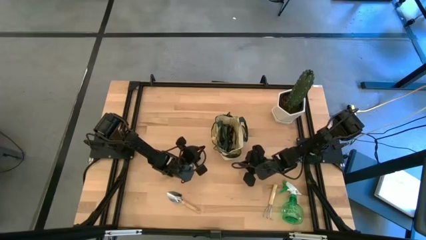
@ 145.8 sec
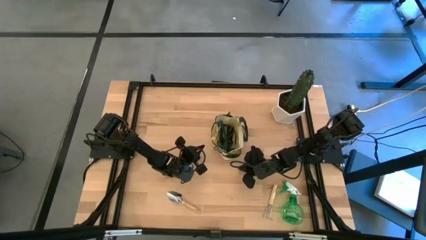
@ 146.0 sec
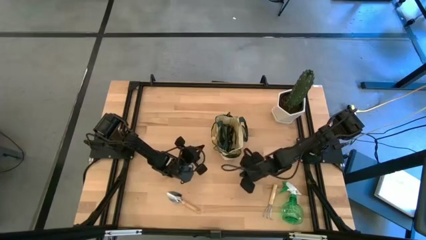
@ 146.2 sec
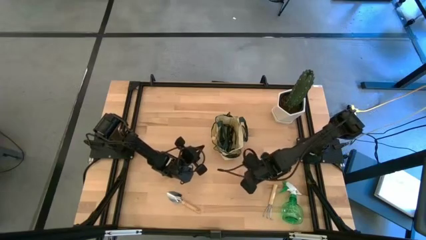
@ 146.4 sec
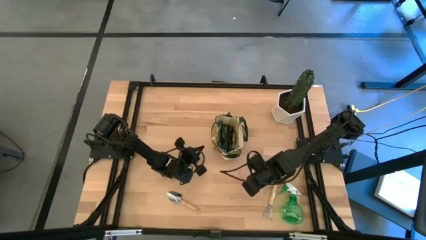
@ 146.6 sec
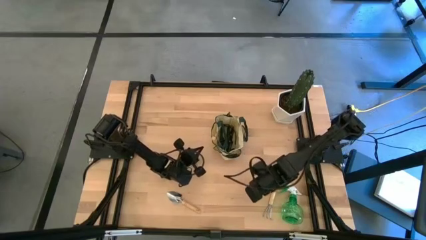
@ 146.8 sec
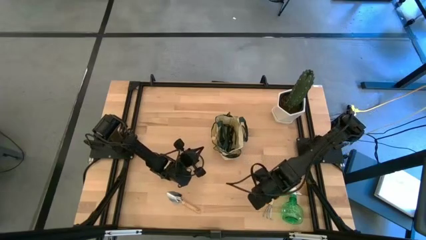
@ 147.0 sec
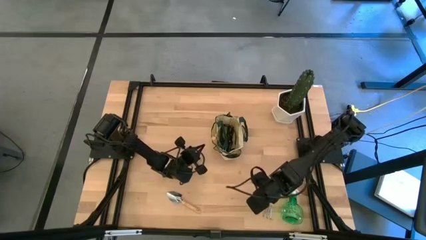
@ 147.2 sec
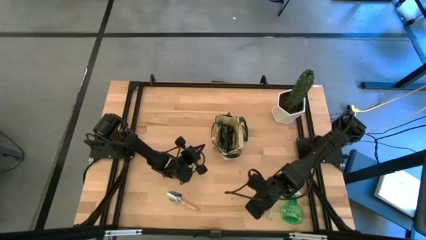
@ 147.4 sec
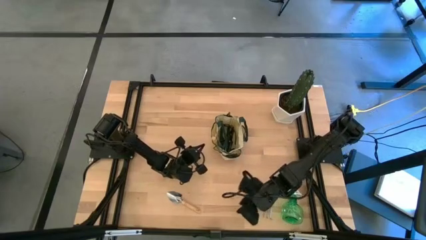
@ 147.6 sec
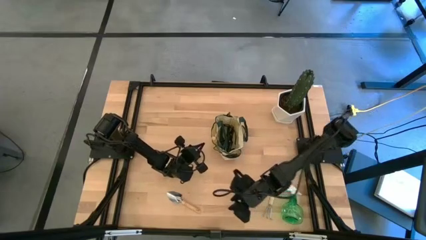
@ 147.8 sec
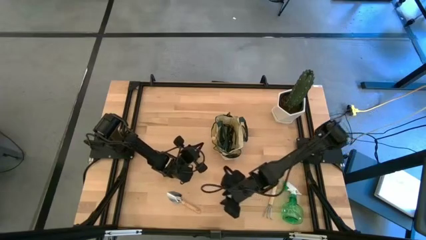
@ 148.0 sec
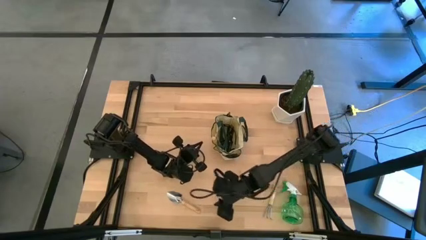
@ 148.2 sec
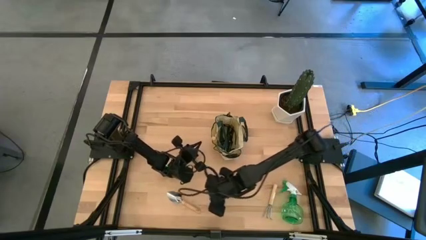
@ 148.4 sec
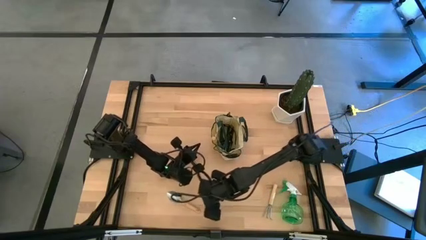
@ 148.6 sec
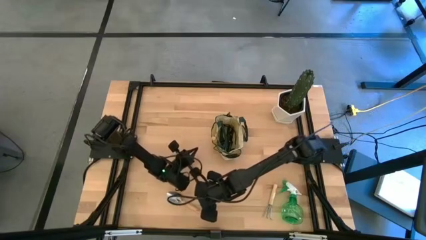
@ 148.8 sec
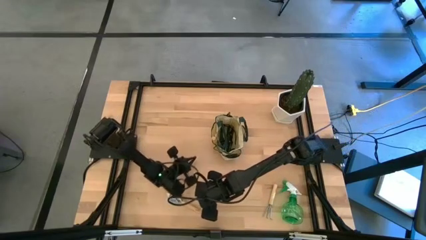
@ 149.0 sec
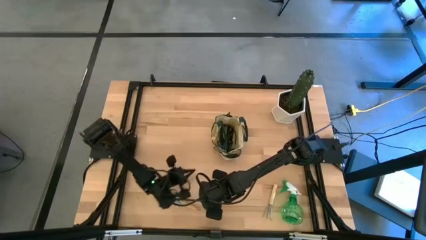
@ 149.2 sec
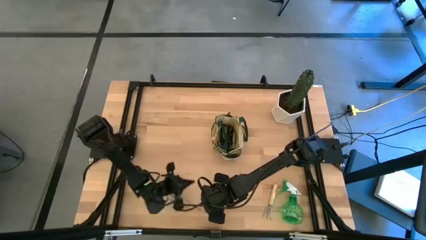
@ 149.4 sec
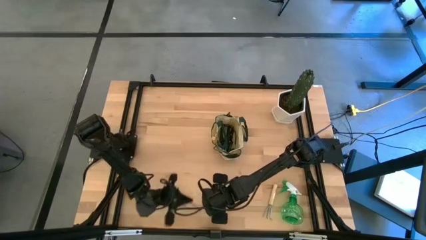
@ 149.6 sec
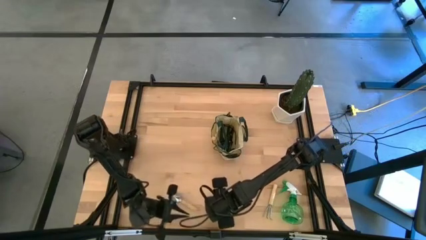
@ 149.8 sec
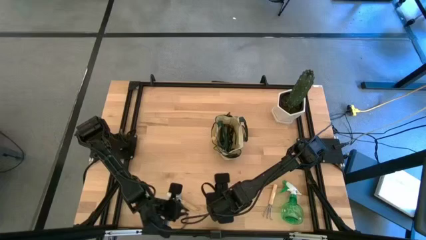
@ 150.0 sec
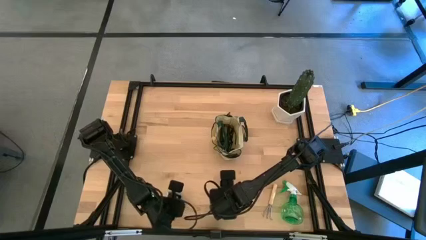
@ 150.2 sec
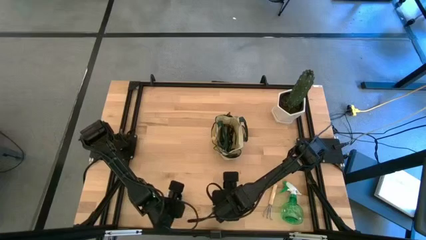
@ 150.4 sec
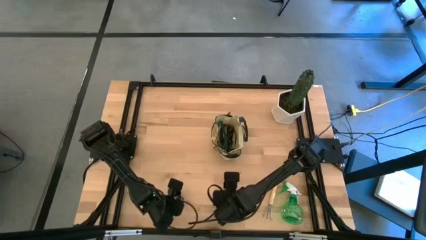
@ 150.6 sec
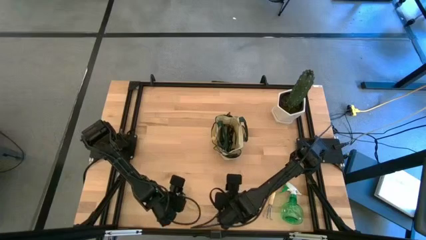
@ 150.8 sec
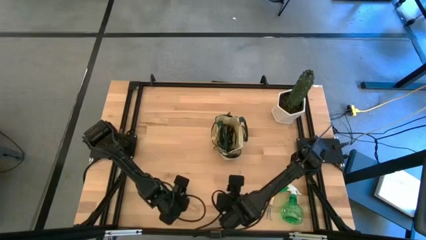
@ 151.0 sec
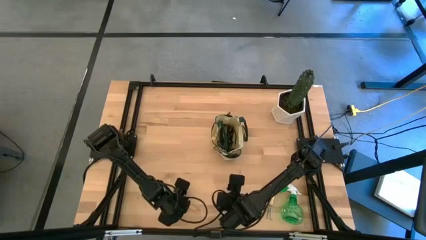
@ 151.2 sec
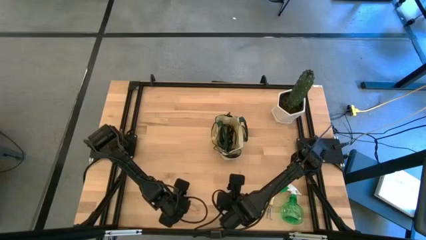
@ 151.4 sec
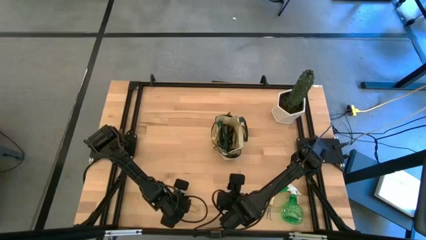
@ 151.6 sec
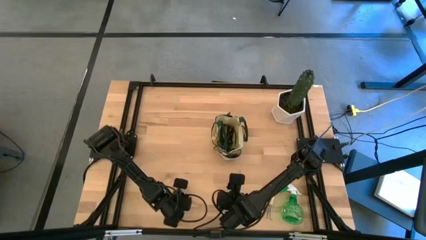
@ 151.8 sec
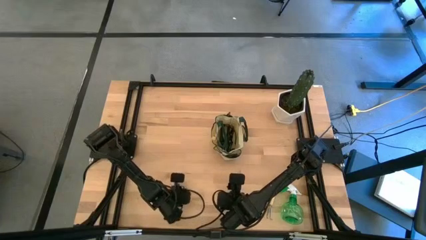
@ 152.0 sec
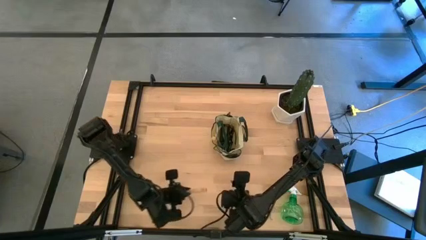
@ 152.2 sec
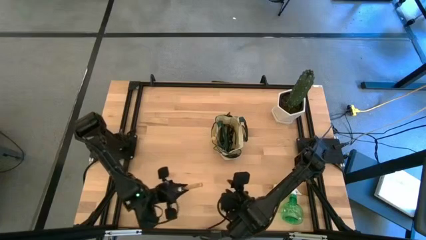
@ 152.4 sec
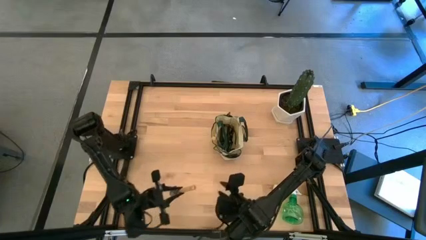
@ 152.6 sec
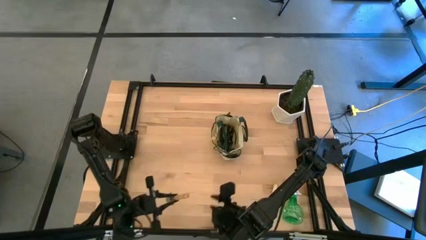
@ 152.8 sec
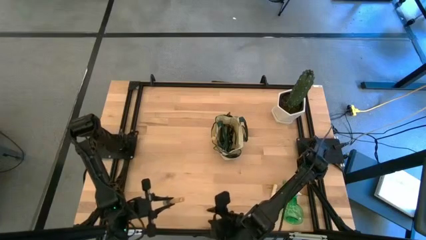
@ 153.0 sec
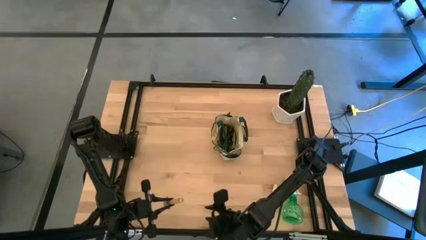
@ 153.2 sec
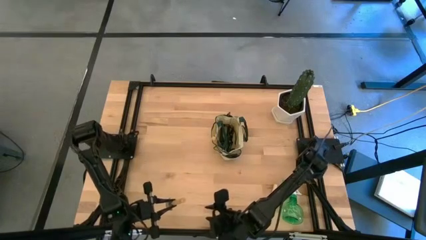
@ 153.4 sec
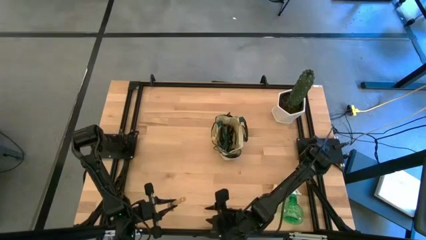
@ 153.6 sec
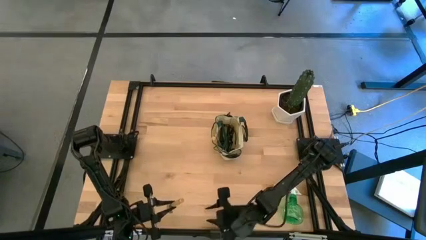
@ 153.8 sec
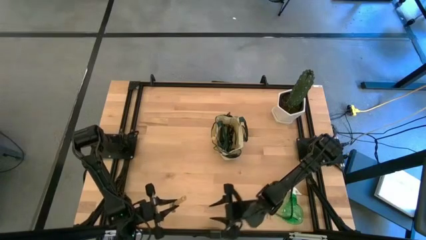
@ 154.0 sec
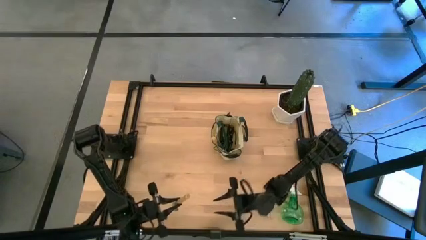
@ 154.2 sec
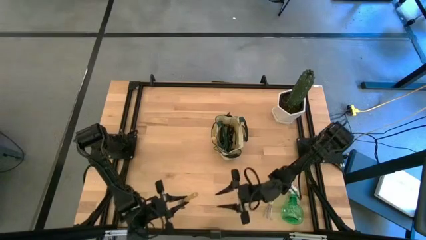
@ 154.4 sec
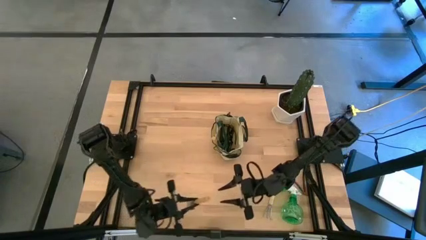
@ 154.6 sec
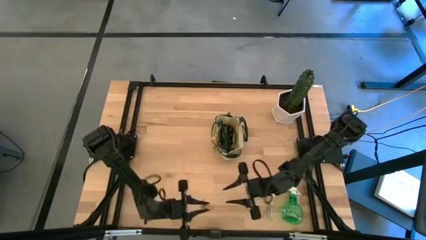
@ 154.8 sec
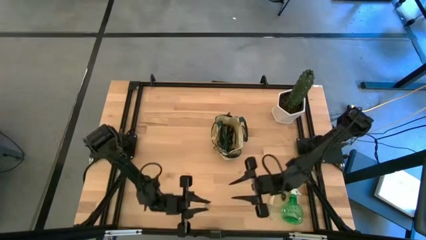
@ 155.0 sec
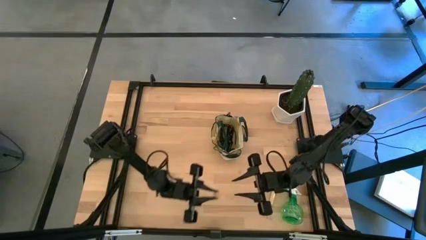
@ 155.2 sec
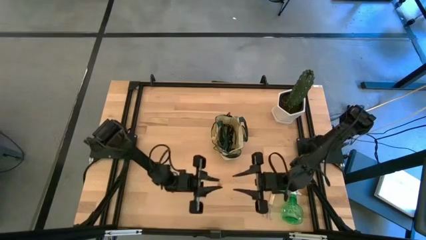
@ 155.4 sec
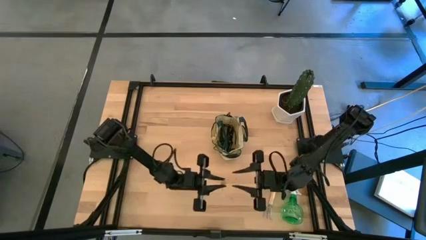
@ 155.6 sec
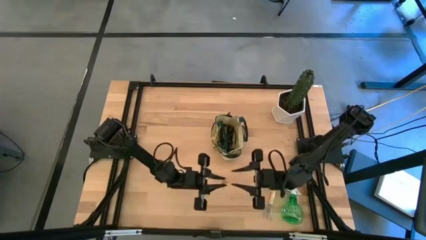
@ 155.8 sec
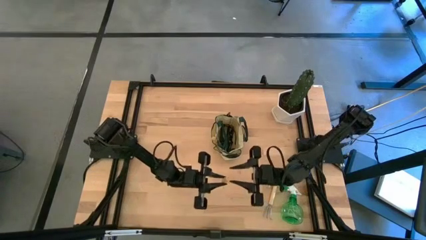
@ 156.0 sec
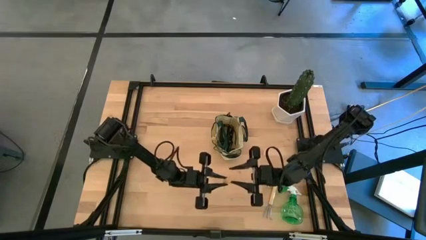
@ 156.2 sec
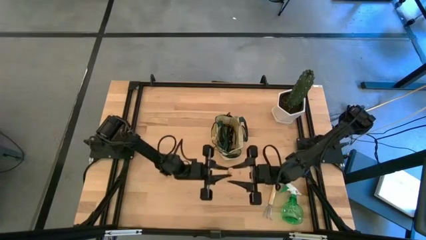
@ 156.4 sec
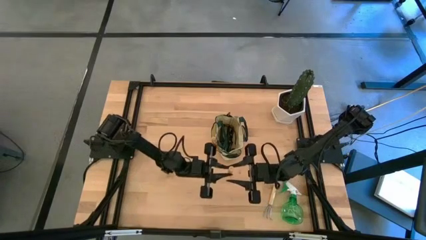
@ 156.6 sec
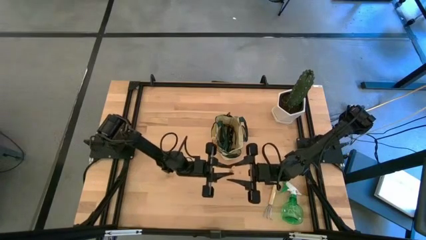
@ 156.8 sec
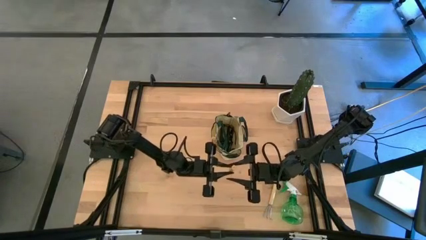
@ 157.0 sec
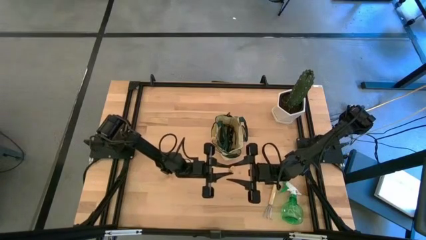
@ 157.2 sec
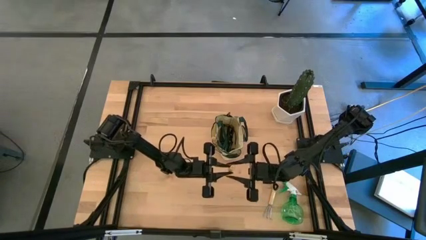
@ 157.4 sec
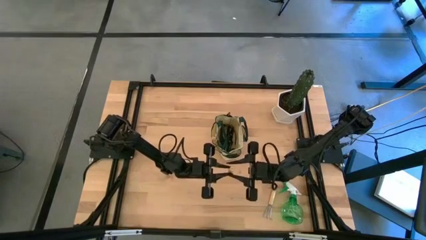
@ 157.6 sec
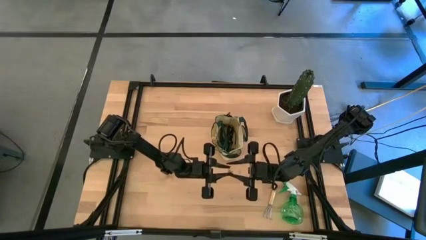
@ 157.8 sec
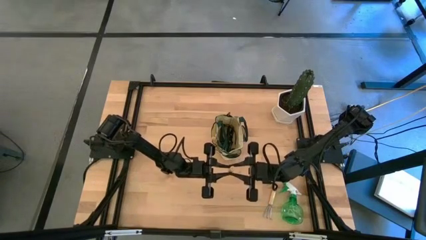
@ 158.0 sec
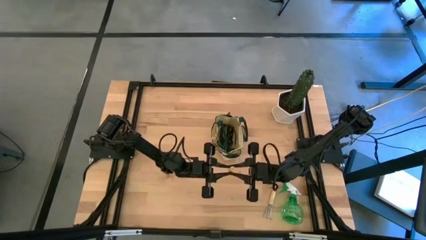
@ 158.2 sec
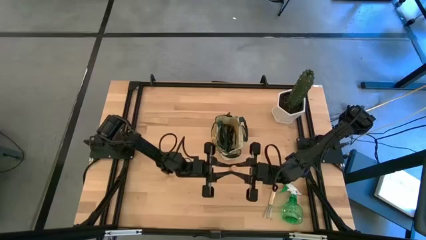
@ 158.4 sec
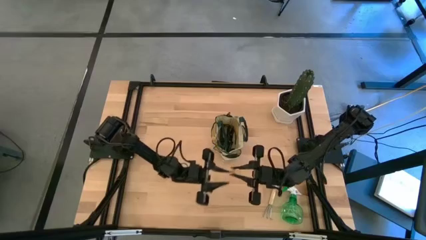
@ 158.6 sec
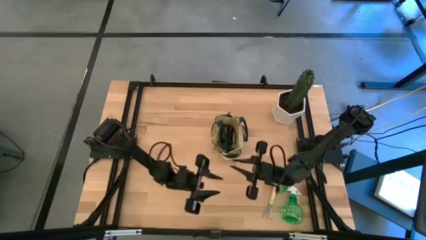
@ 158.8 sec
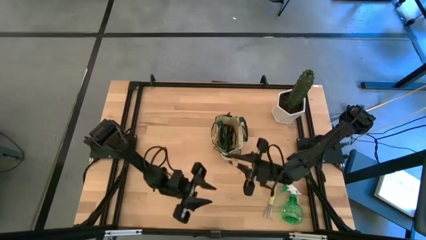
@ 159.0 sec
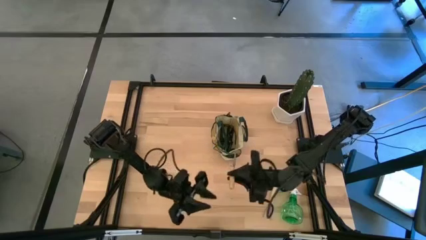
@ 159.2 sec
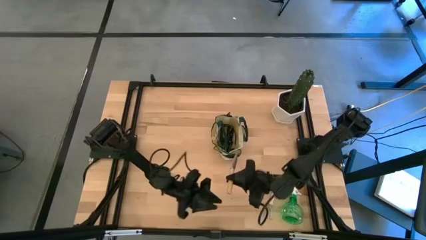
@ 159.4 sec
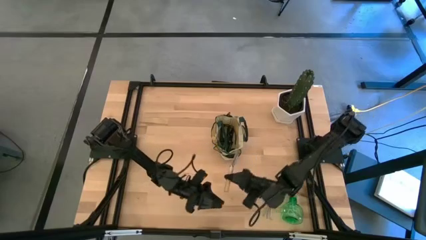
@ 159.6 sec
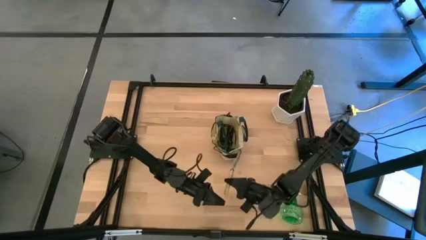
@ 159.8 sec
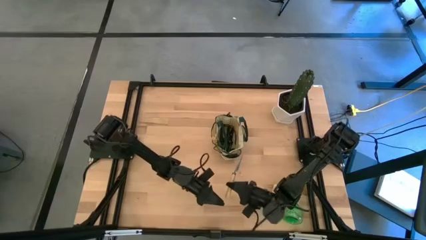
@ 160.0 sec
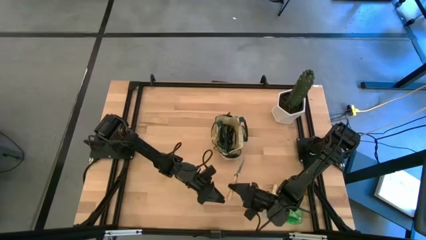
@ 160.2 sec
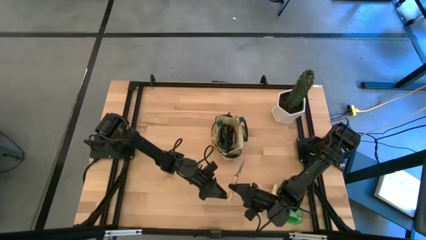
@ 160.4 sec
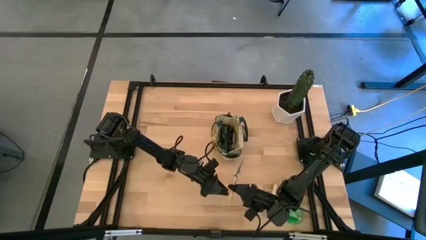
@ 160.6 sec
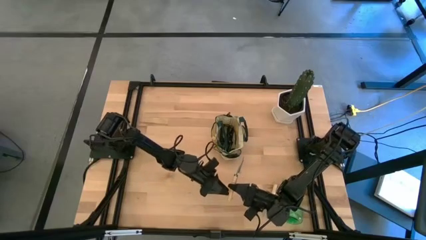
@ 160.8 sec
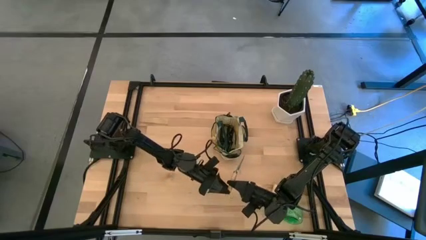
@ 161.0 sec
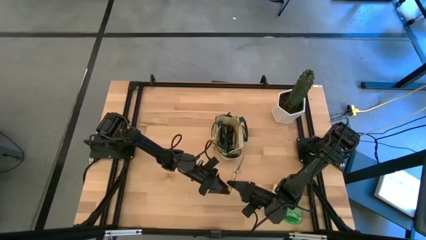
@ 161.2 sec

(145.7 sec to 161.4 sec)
Task: Pick & Place Garden tools in Gardening bag
Put the brown trowel into the green gardening bag
